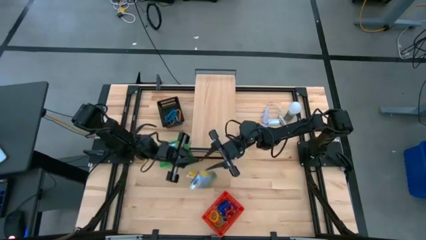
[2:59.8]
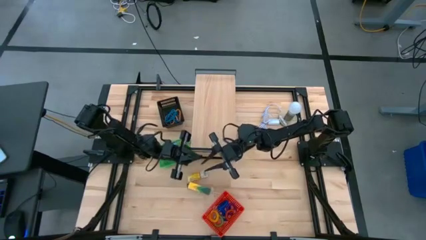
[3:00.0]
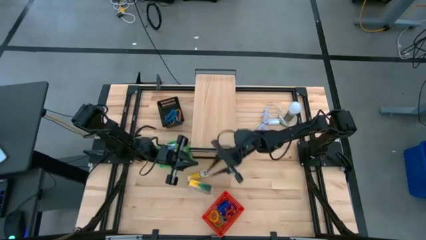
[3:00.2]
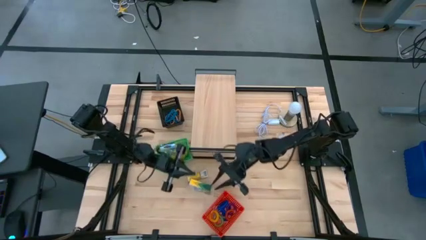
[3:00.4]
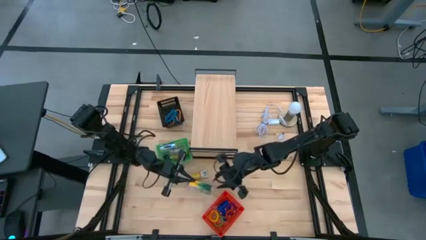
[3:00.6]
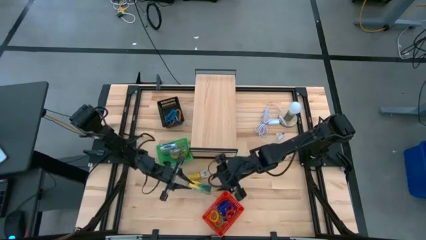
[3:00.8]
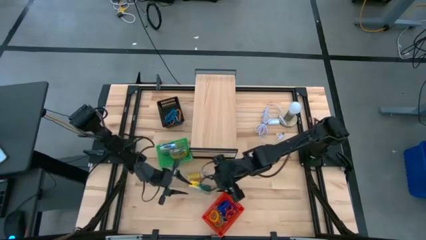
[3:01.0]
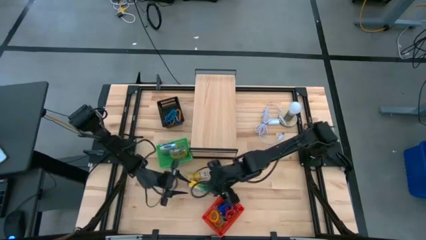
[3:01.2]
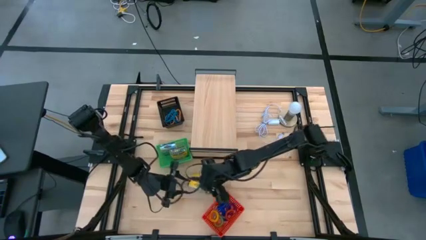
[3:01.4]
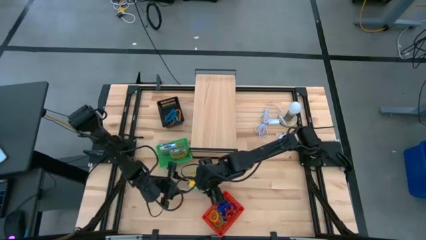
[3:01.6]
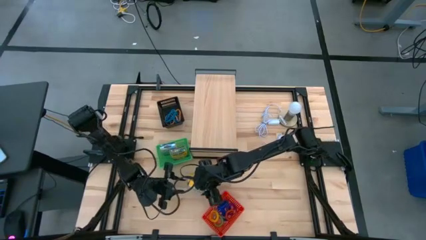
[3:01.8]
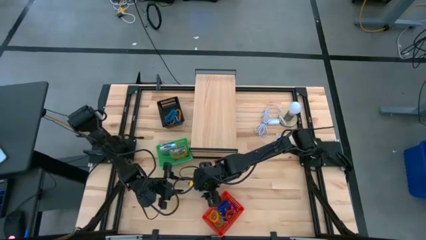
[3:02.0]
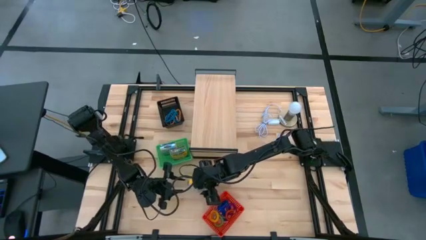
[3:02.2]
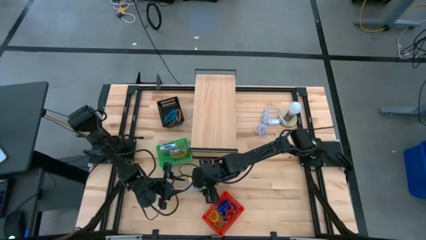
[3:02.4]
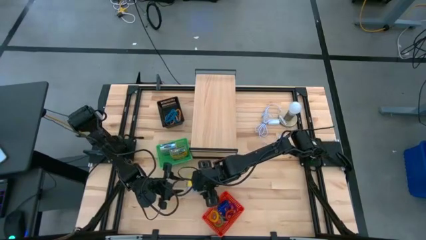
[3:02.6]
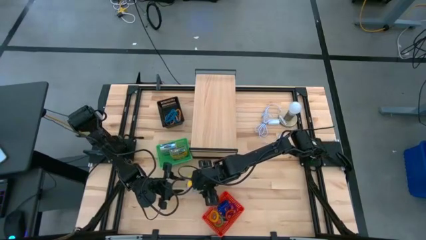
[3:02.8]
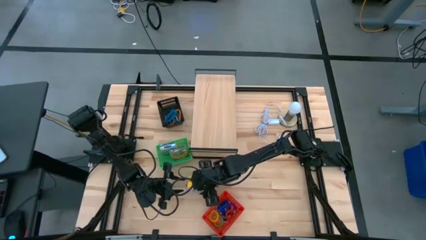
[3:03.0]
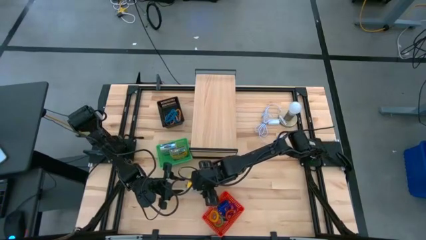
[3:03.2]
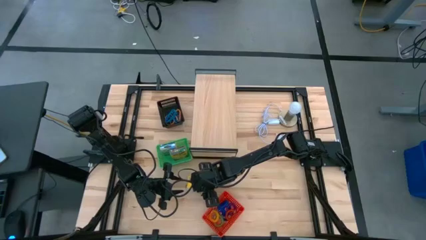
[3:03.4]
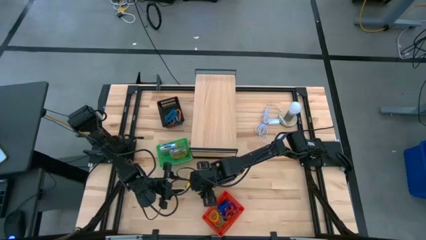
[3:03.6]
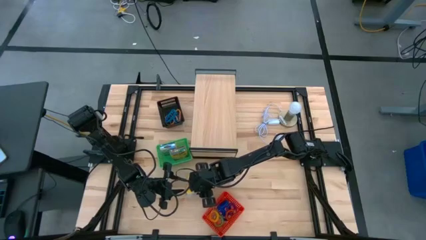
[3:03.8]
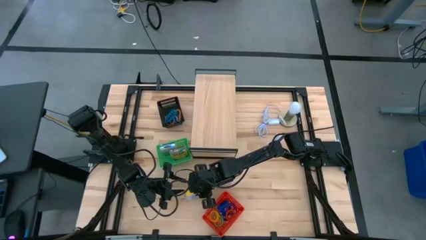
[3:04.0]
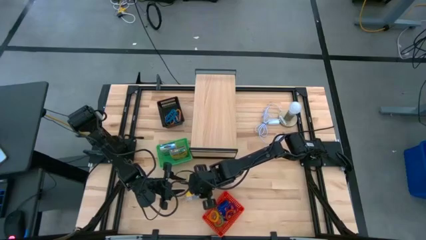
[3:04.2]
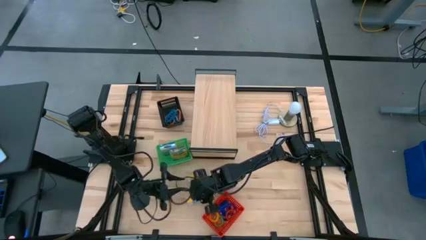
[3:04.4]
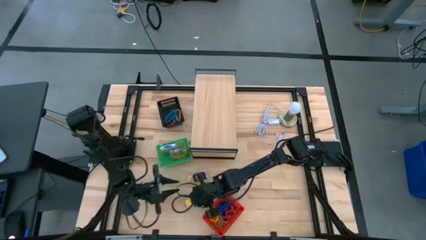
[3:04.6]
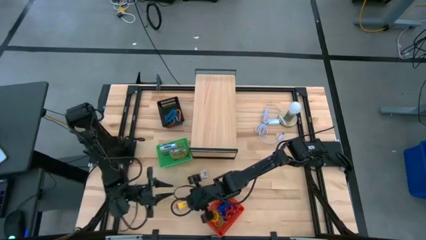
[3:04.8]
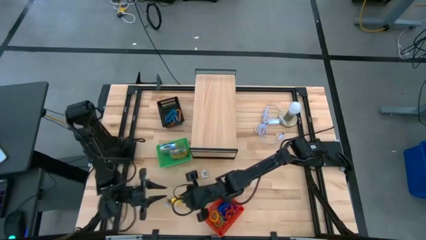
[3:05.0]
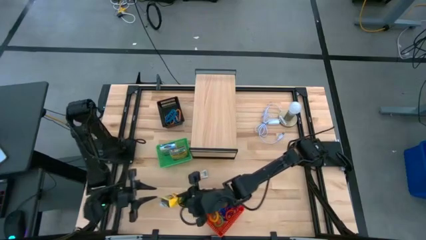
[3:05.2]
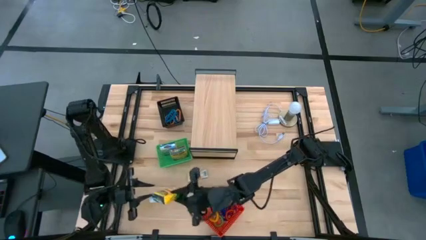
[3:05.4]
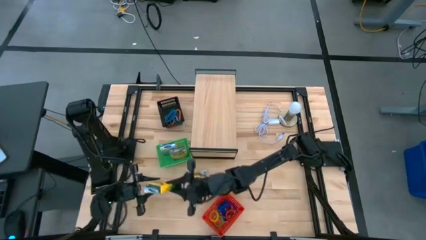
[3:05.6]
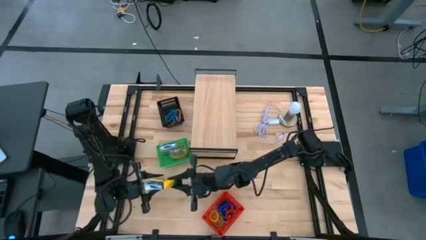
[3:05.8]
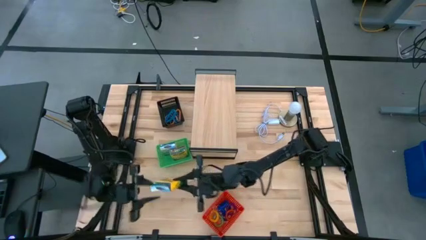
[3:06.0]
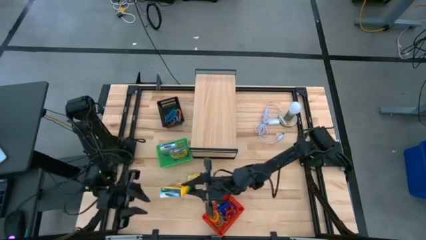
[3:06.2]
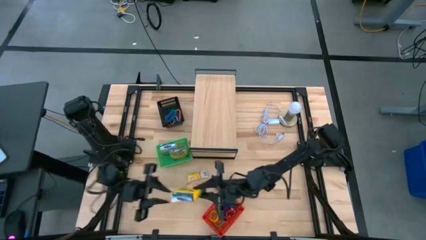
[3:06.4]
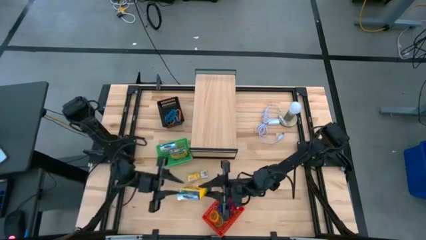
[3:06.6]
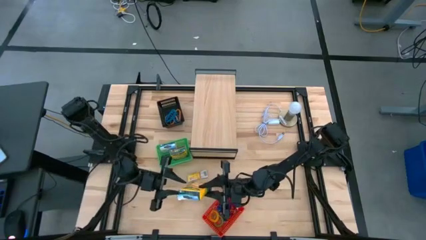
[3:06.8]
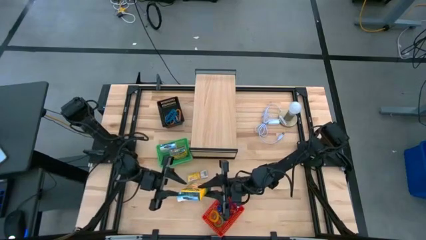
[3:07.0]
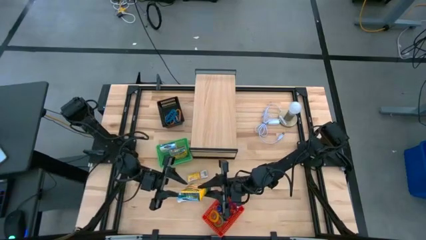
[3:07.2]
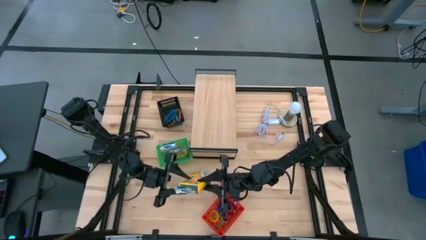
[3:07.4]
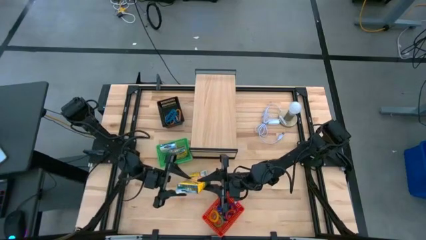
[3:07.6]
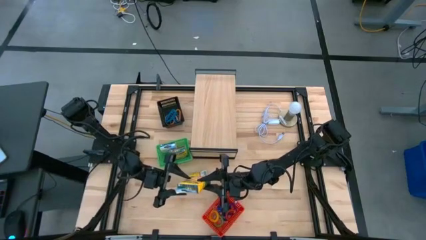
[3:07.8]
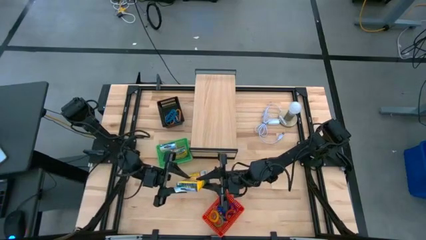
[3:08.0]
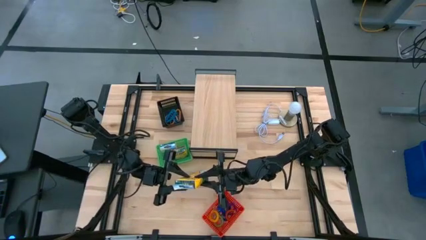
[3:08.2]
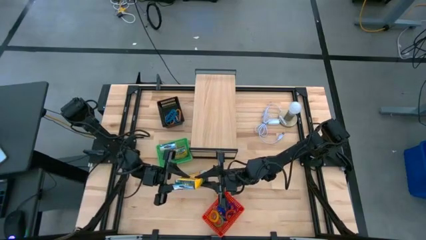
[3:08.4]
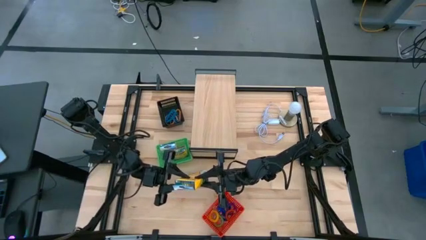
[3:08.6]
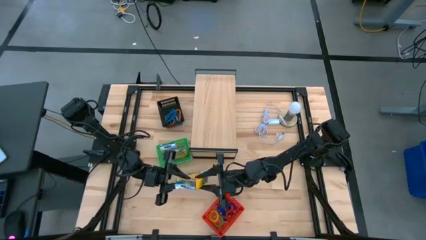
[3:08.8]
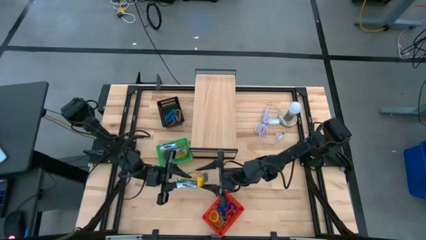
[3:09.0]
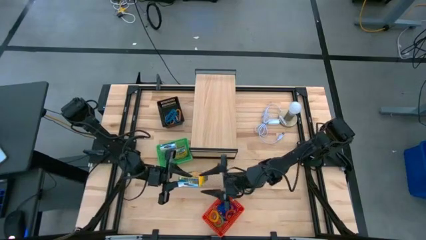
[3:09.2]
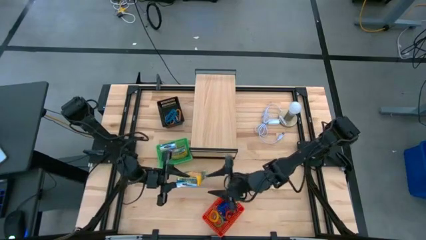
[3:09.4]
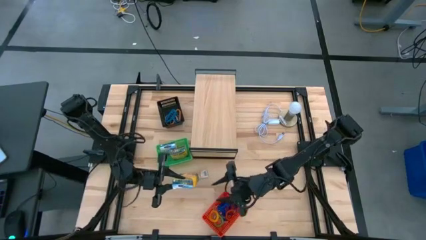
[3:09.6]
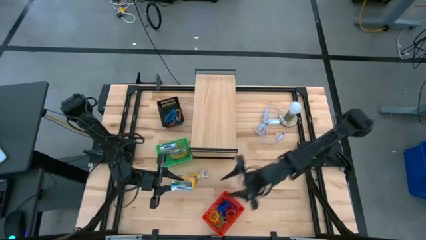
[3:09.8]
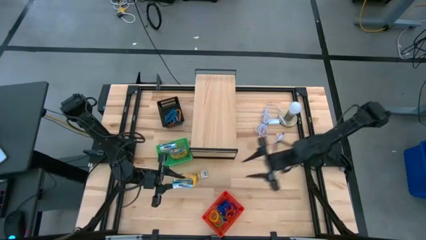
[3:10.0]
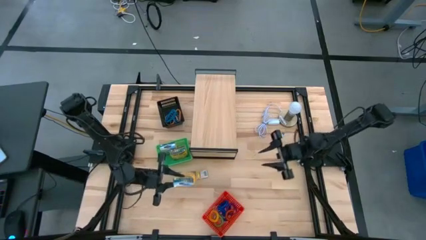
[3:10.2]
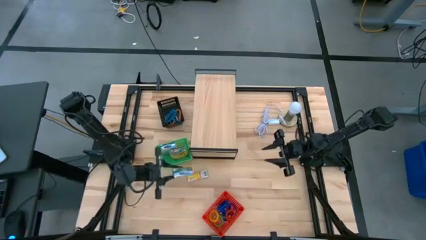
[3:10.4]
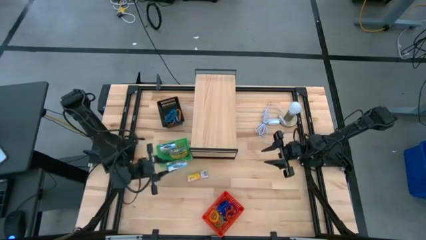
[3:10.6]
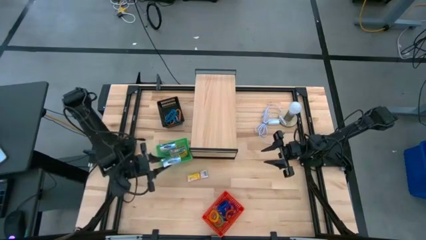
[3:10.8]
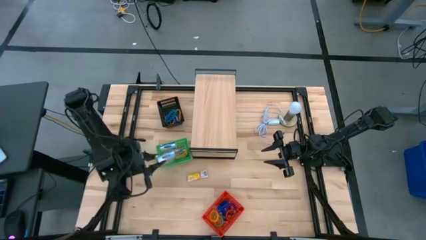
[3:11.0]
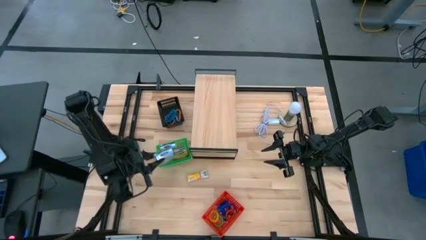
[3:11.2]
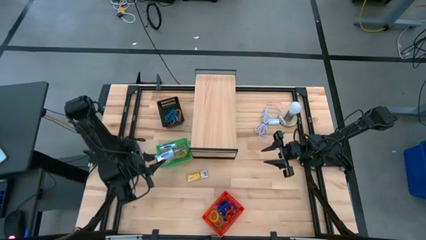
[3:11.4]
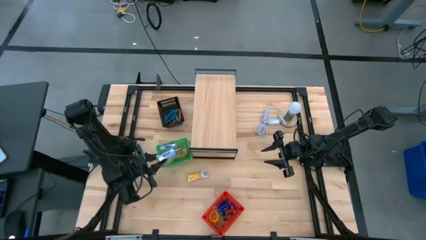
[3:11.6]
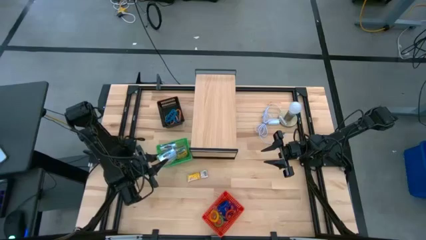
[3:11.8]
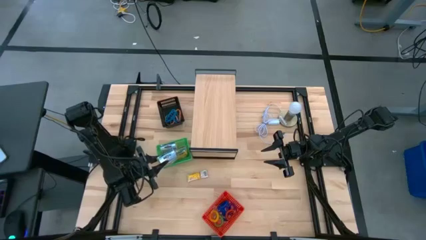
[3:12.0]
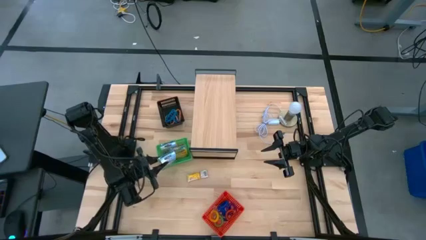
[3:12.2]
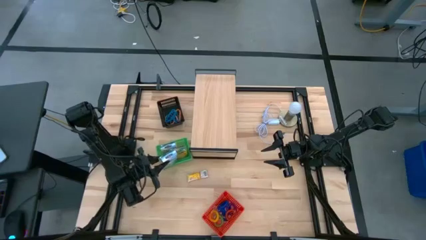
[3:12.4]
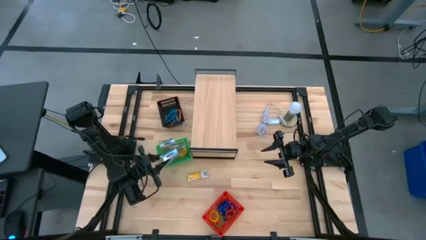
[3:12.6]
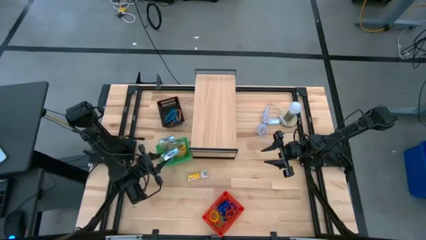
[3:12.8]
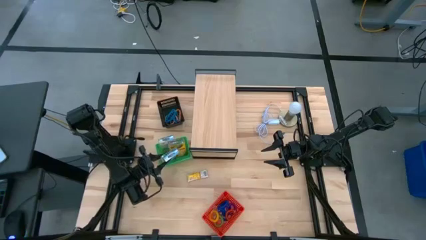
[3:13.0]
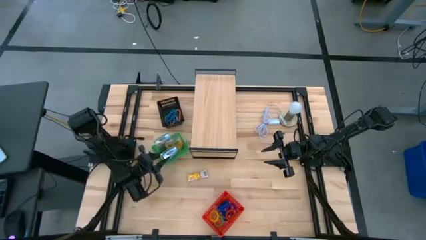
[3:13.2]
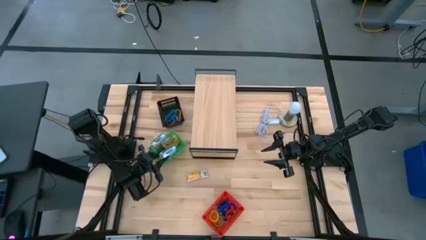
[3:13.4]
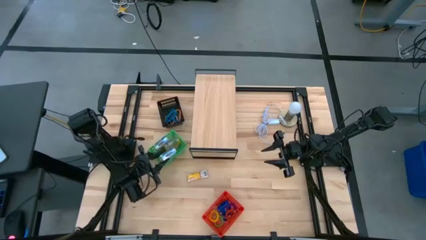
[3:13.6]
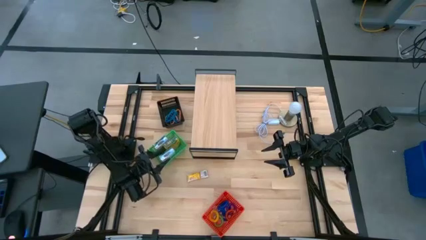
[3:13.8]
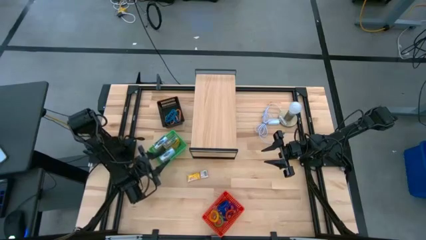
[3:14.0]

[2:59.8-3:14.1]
Task: Pick & Place Office Desk Supplies
Put the large yellow crayon box into the green basket

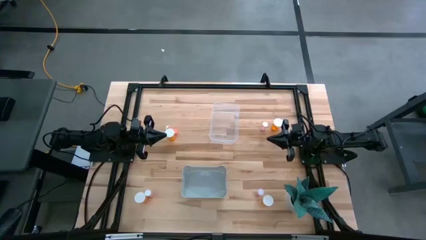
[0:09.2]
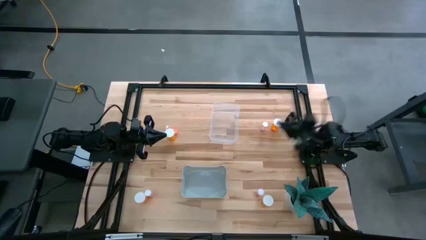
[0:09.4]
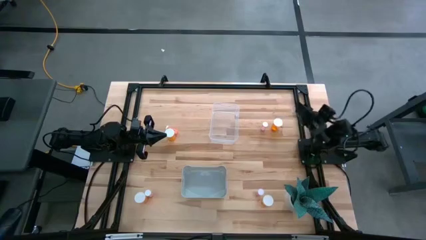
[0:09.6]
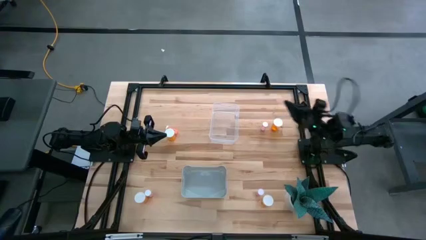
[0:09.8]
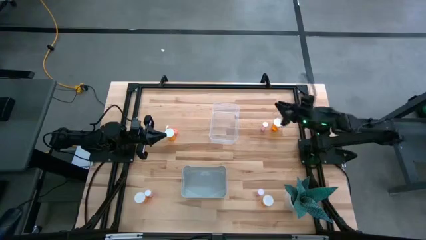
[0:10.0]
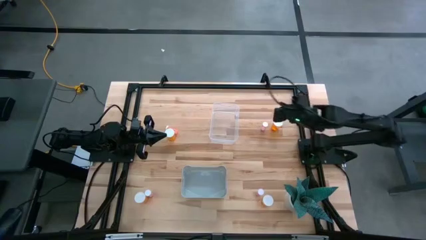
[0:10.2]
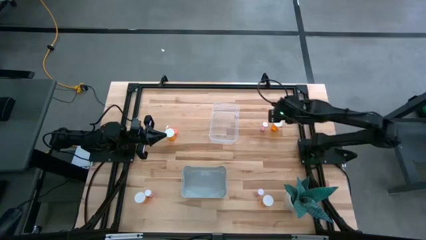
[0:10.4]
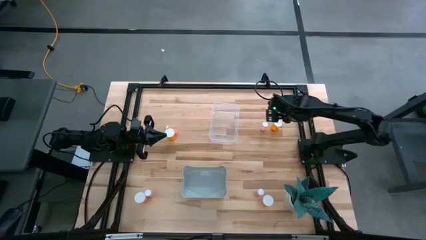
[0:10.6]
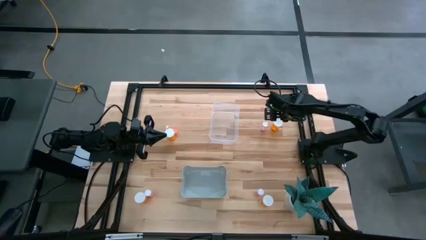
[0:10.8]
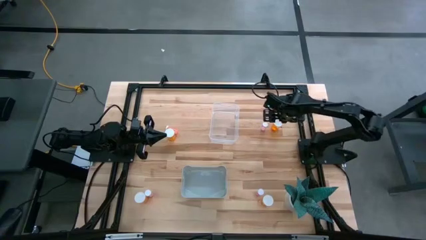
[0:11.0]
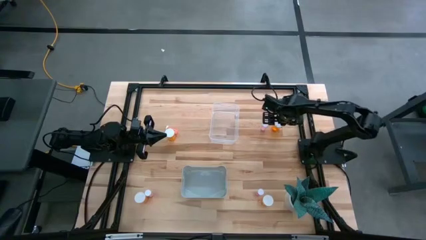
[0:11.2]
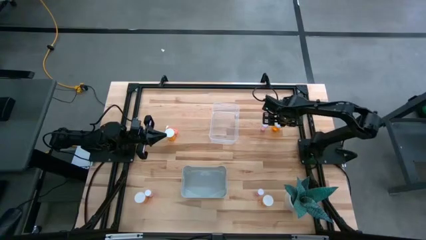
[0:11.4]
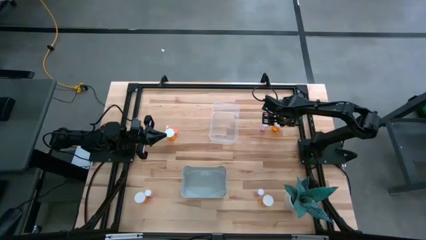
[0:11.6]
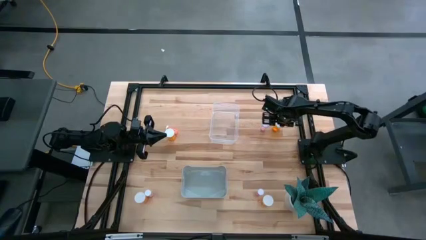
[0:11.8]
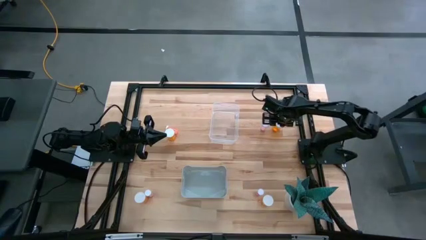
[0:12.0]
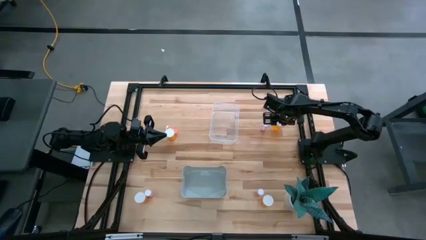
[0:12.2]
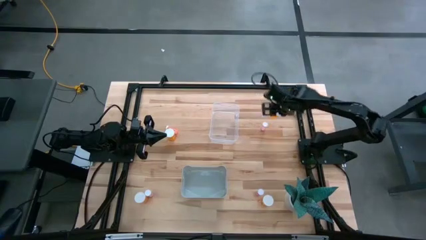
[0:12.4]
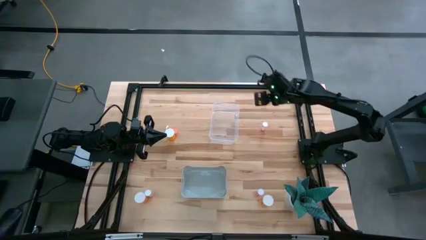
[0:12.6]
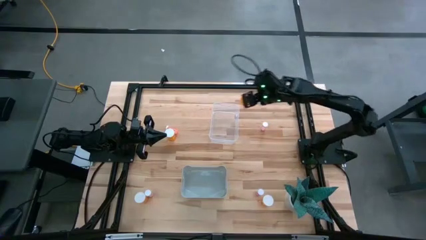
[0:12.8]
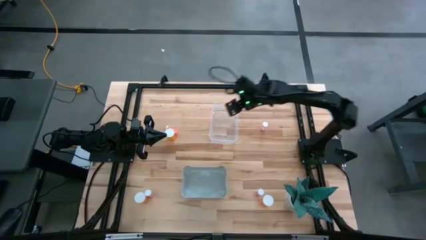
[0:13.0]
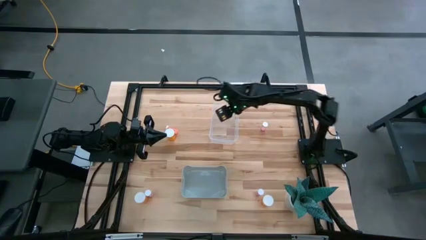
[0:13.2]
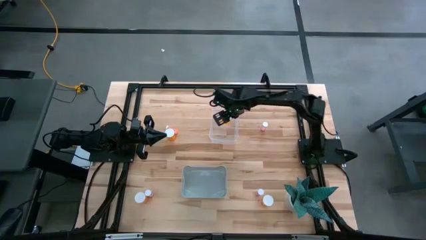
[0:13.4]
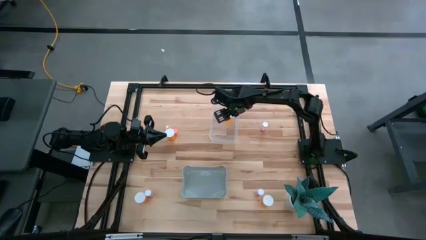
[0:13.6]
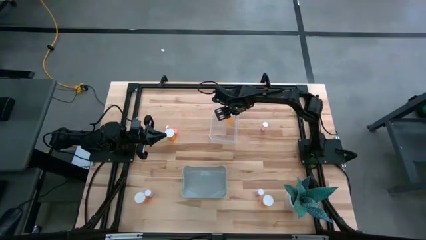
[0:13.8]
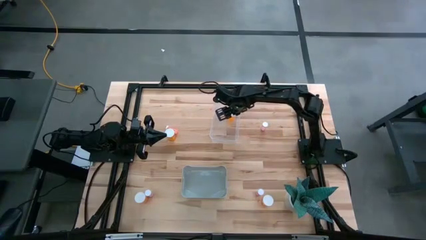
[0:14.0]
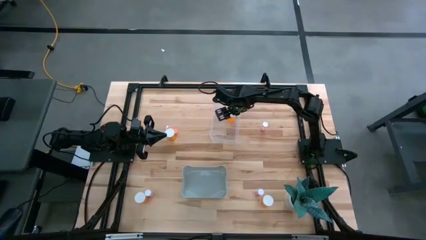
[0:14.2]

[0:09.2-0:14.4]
Task: Pick and place medicine bottles into bin by pill shape (circle, oval)
Put the top right orange pill bottle into the transparent bin
